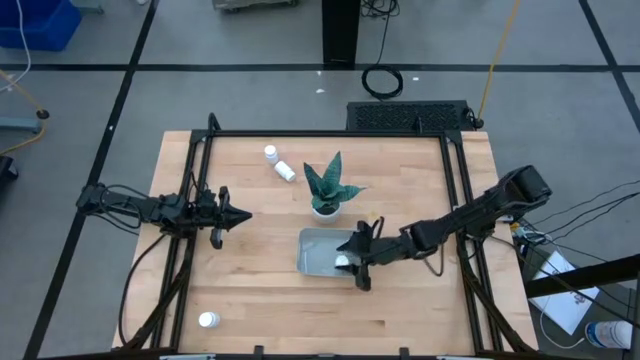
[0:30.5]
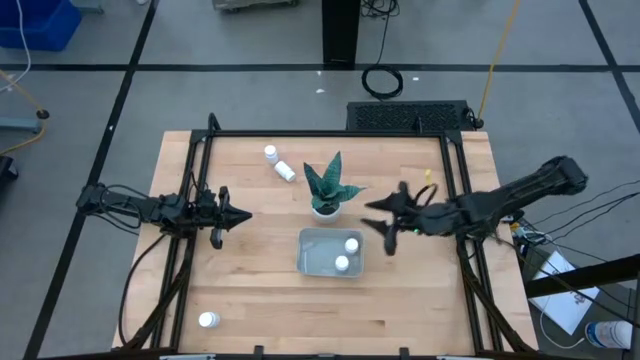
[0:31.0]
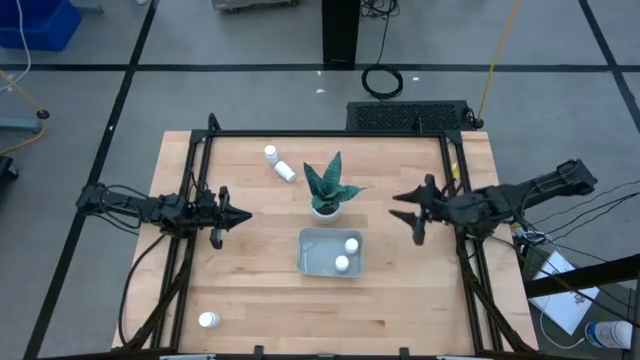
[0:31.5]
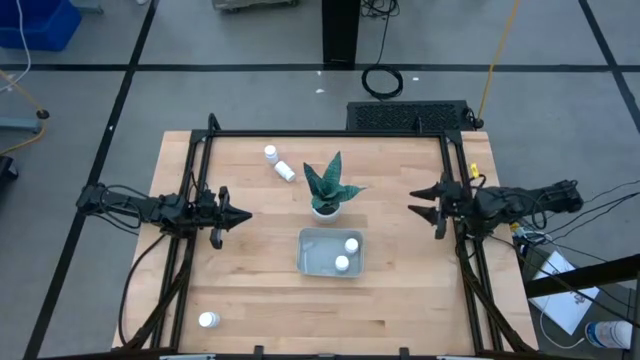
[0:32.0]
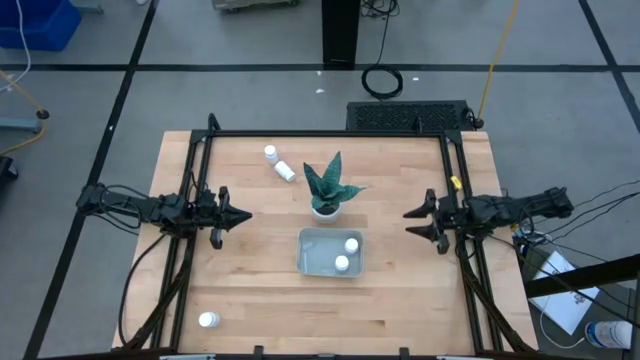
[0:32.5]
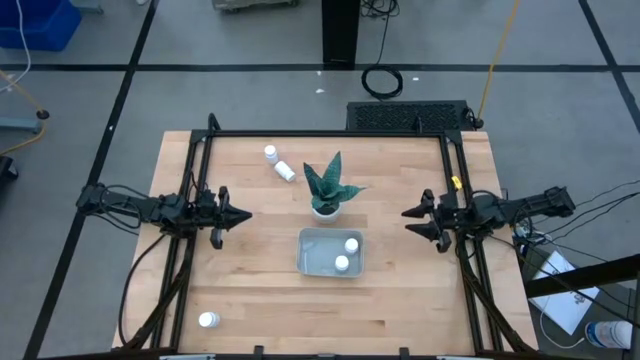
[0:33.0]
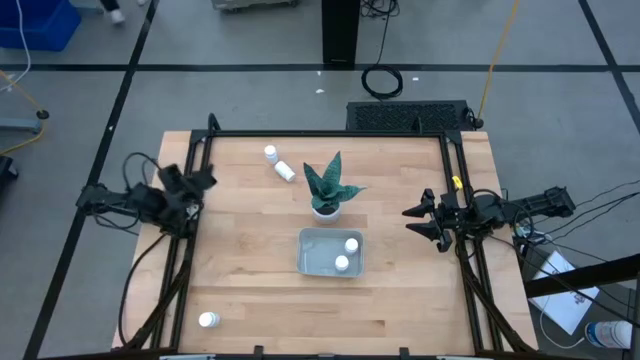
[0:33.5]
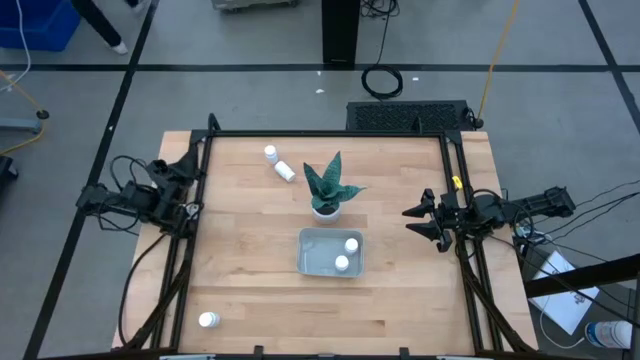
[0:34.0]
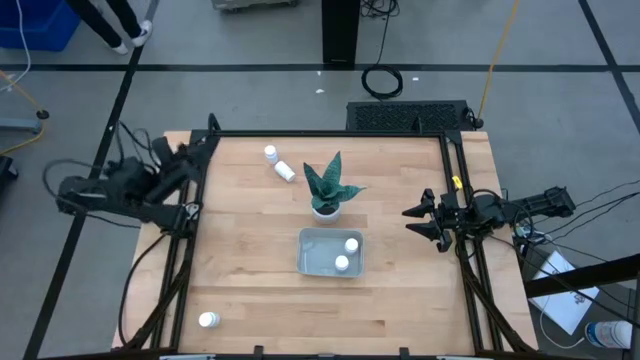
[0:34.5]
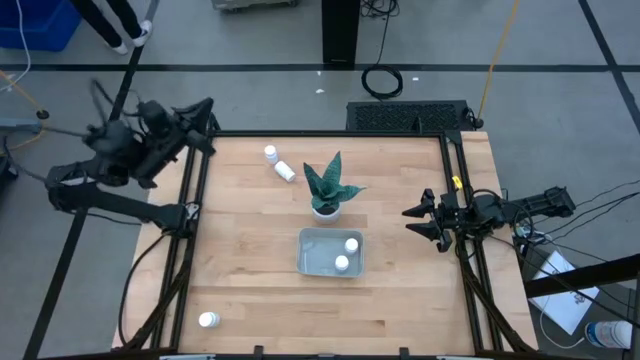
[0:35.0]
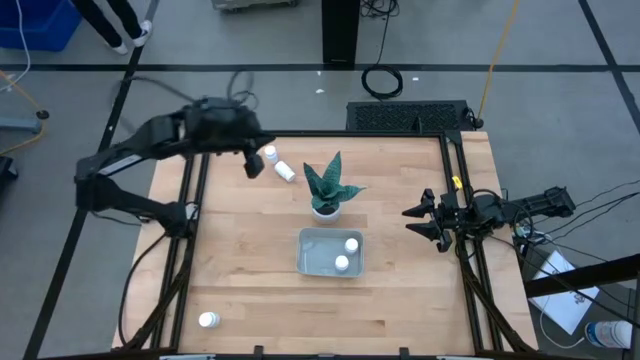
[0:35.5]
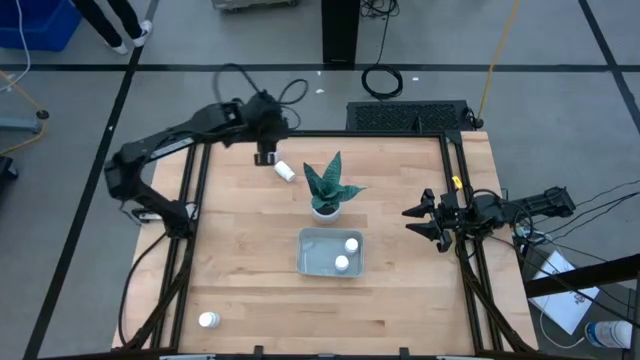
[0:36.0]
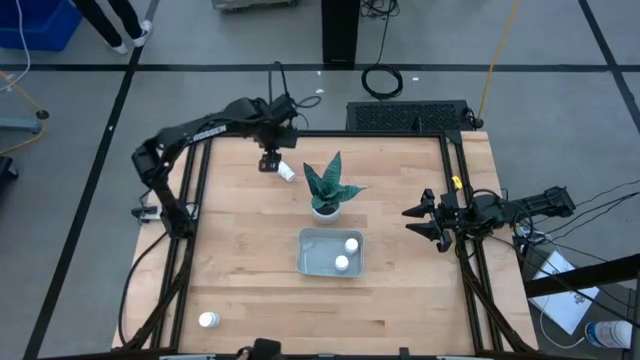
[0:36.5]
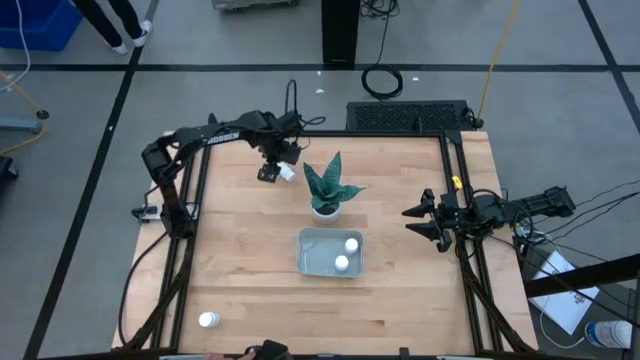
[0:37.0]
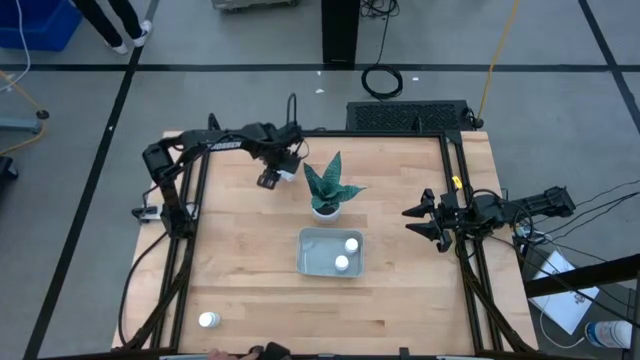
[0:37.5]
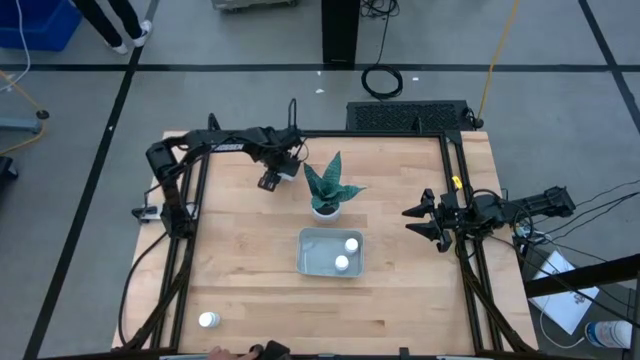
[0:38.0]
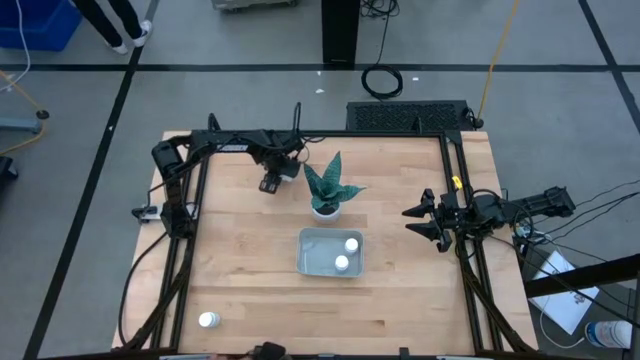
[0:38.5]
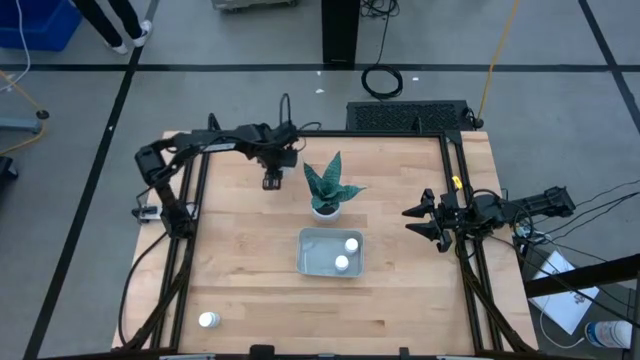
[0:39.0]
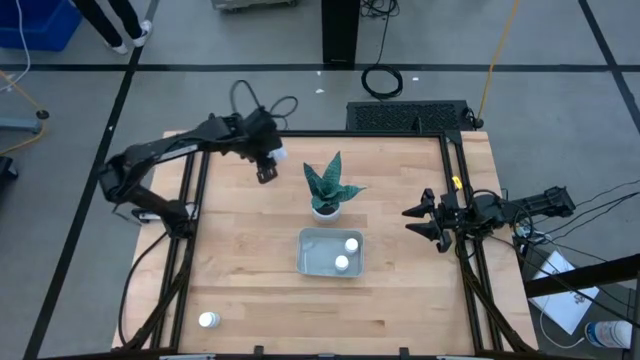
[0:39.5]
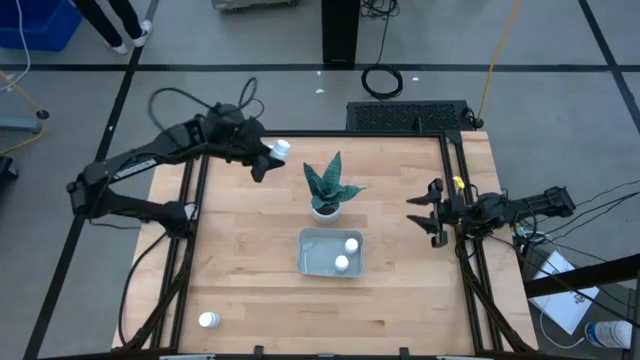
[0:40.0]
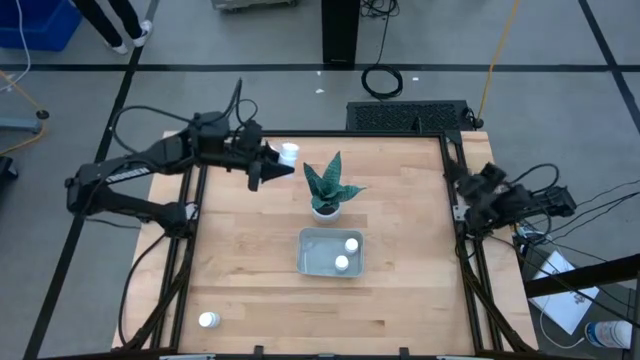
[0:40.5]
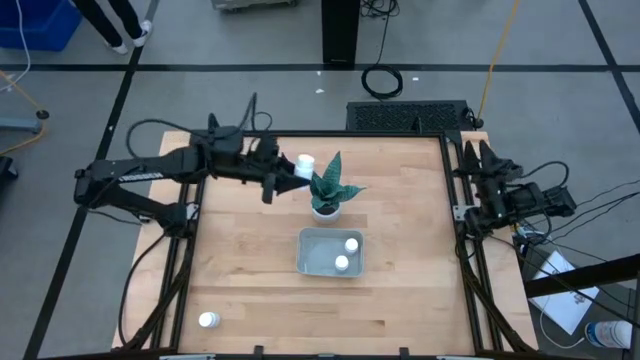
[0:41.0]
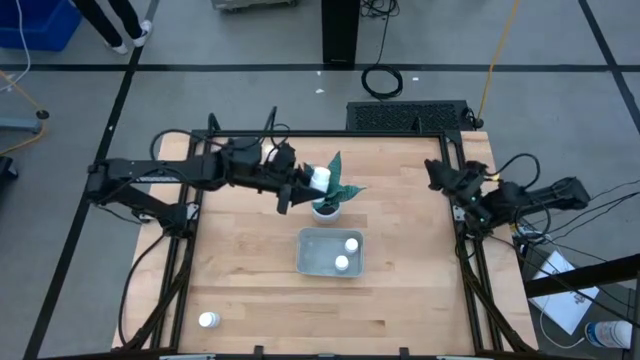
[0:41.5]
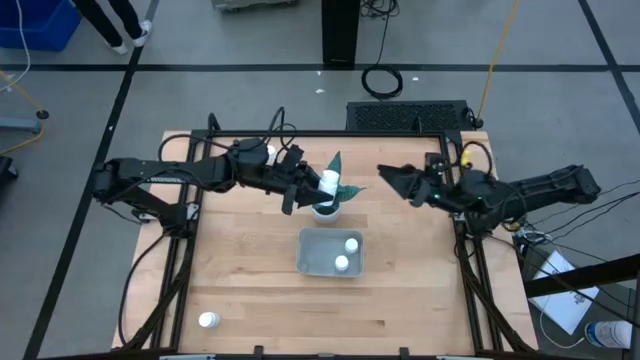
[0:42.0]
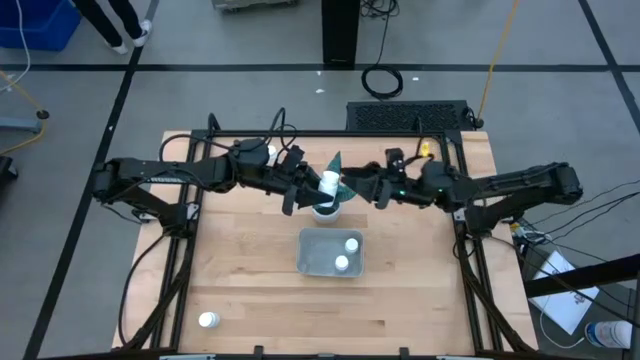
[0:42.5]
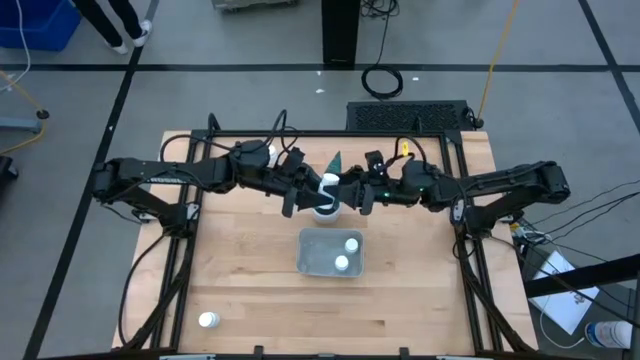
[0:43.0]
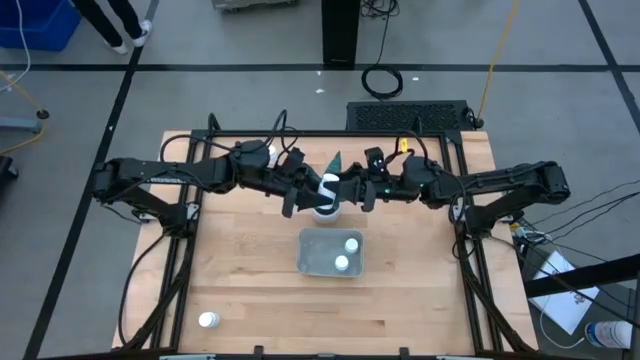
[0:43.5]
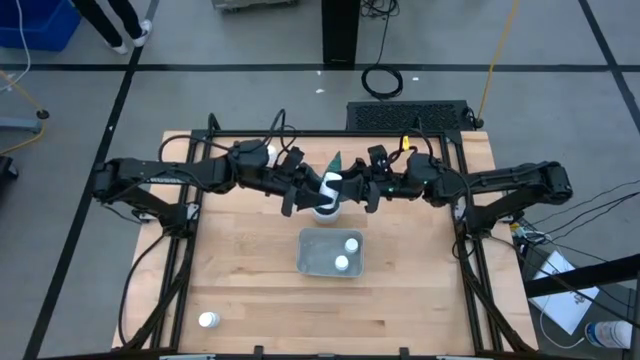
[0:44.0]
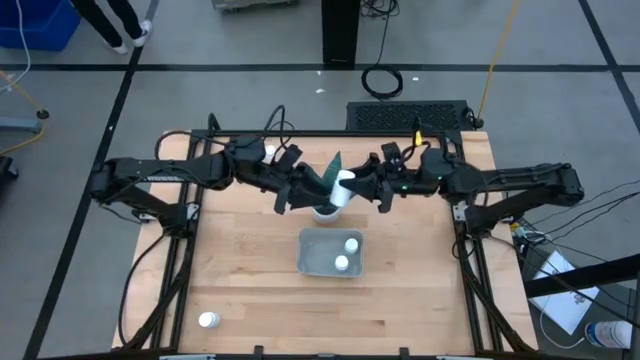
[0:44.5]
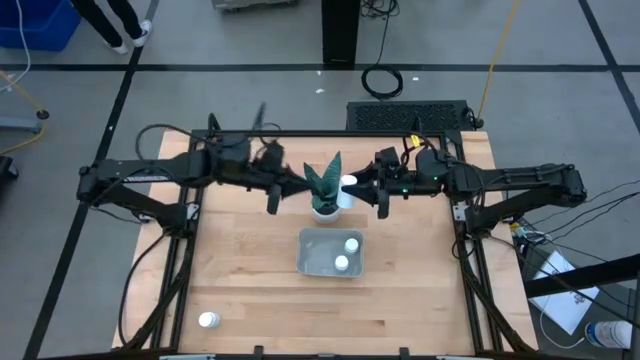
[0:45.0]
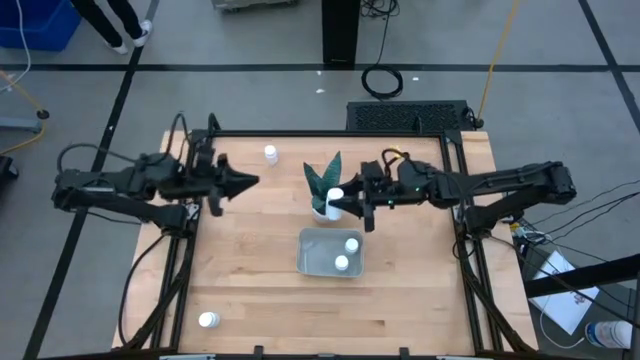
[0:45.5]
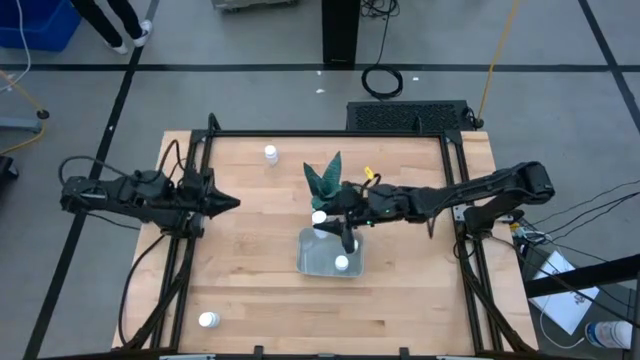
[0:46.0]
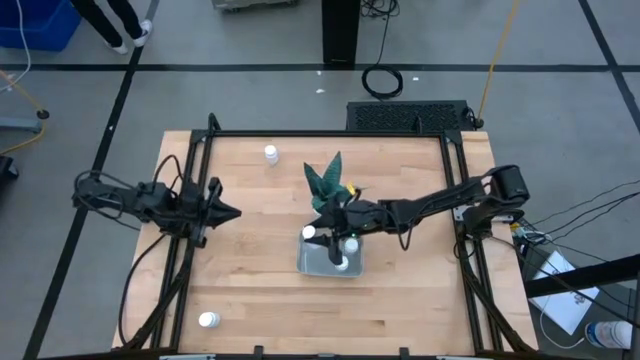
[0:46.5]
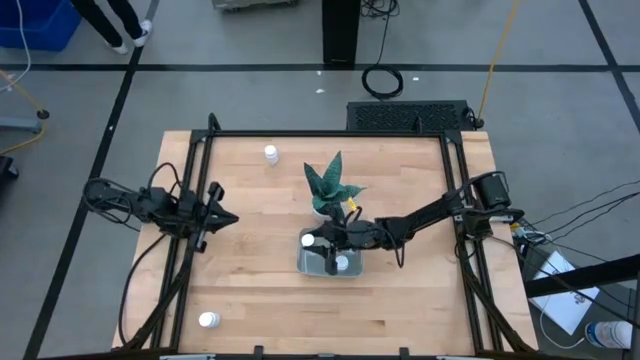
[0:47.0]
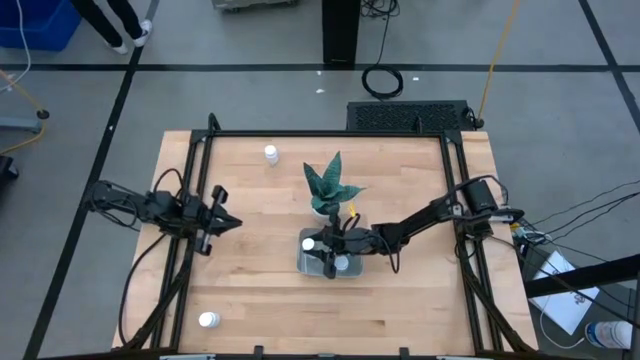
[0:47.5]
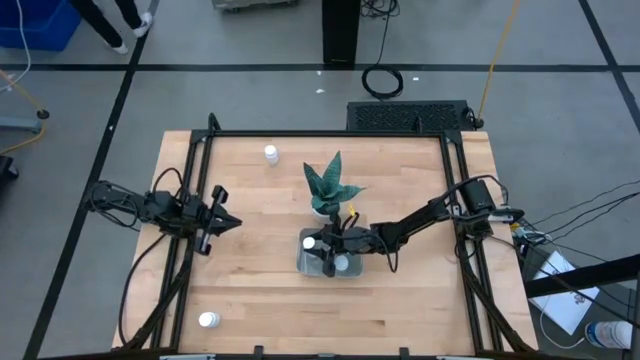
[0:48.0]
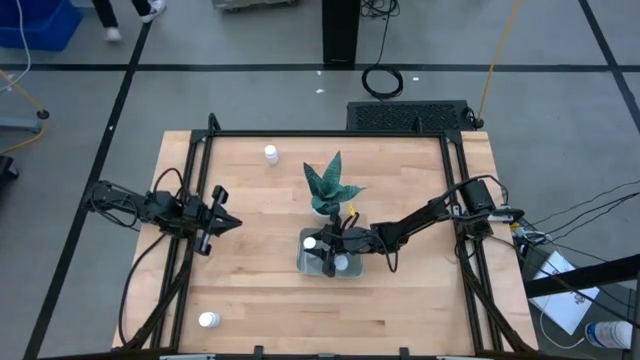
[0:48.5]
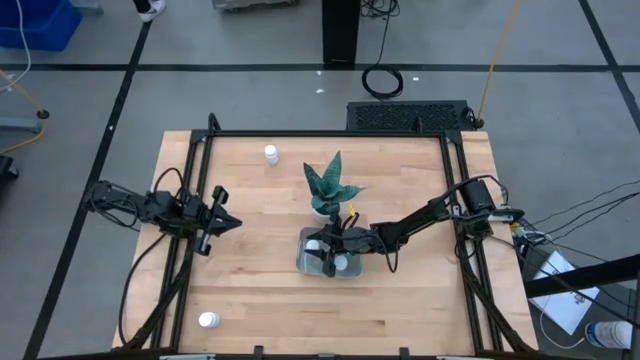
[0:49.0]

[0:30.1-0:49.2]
Task: Pick and place pill bottles into a basket
Put the white pill bottle into the gray bin

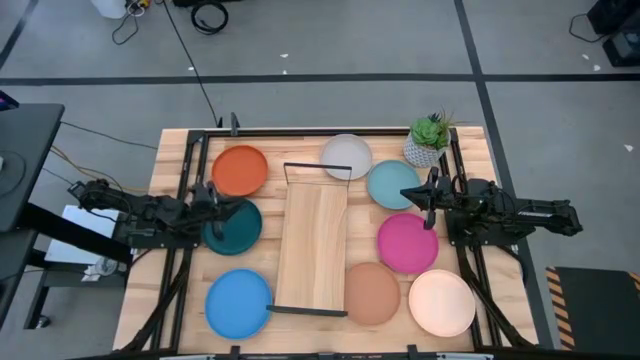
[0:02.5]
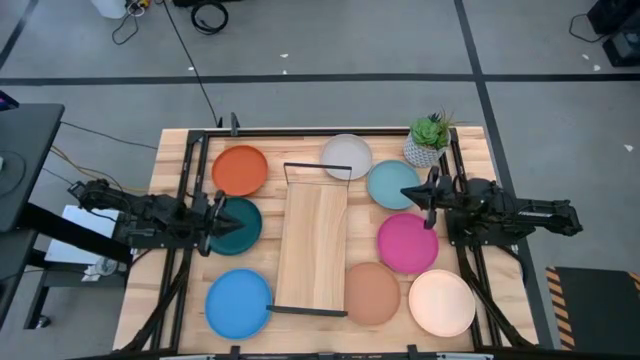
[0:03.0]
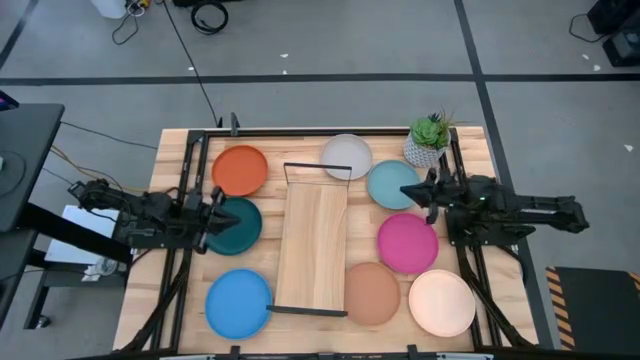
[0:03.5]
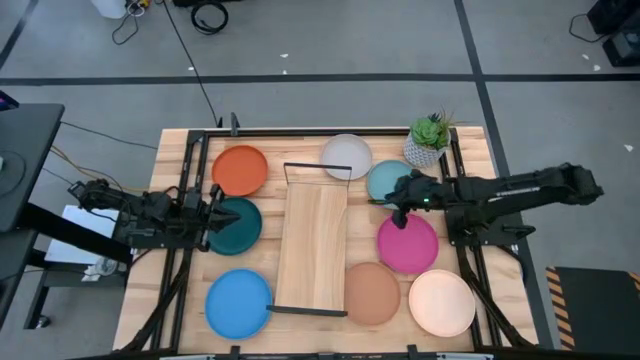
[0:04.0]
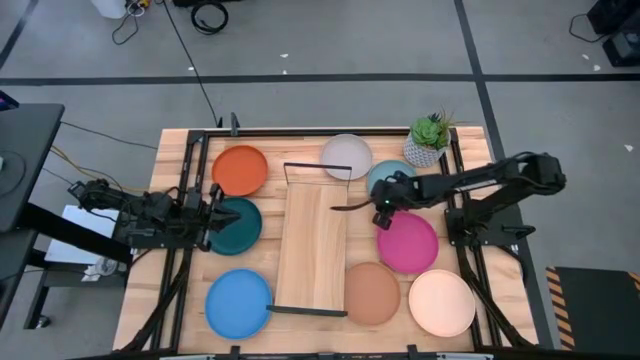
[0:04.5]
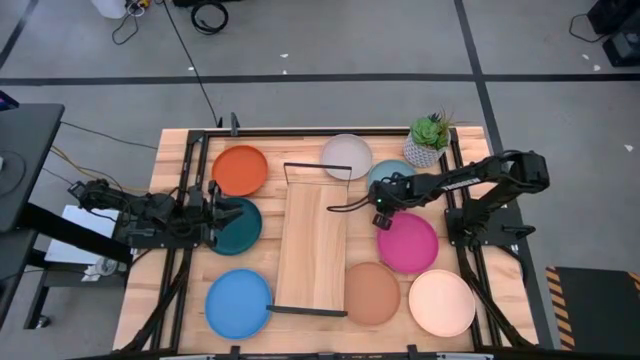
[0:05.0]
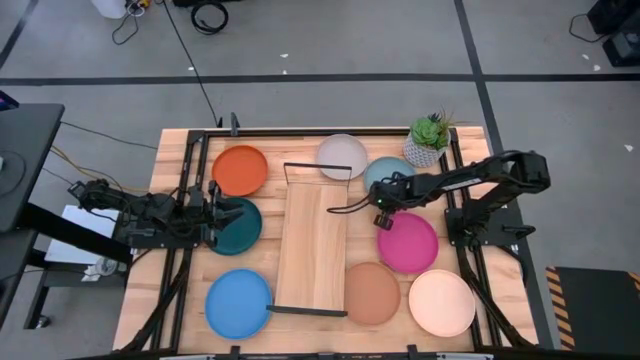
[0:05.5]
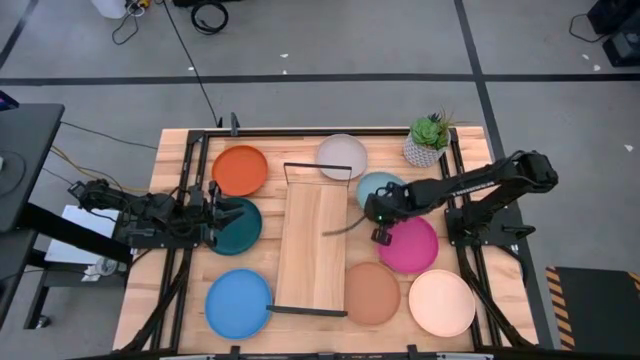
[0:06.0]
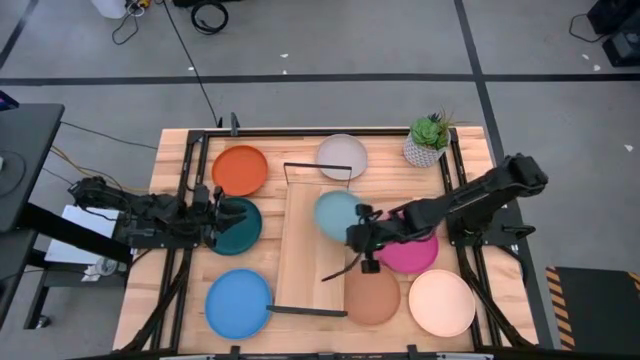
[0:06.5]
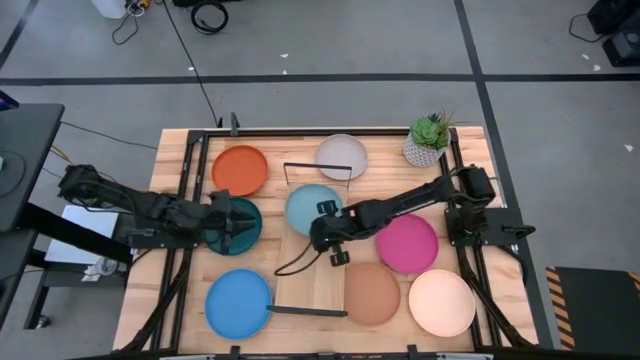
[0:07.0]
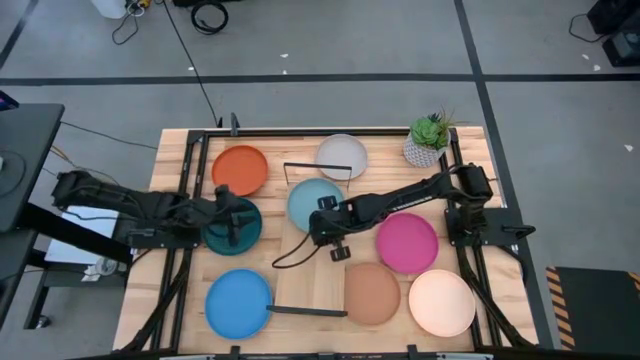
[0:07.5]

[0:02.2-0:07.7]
Task: Place and stack plates onto a shelf
Put the light blue plate on the shelf
